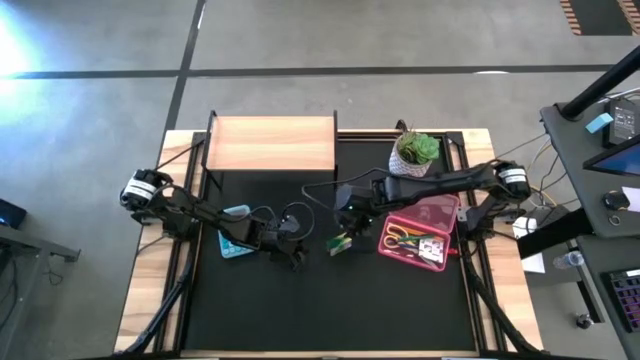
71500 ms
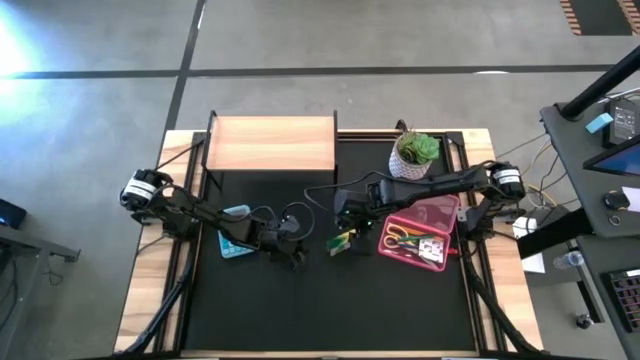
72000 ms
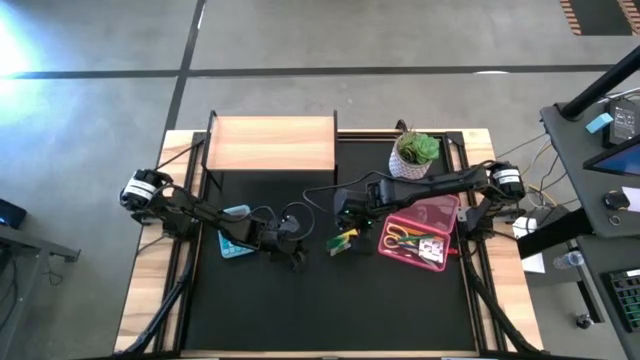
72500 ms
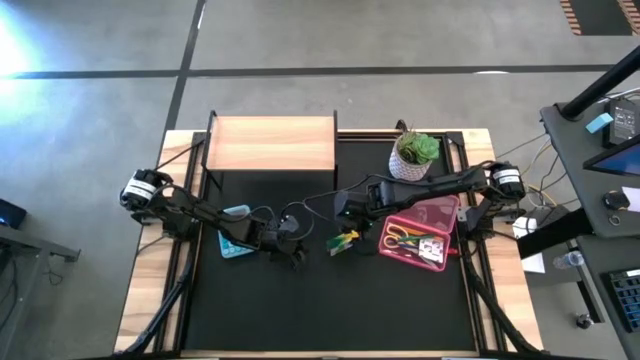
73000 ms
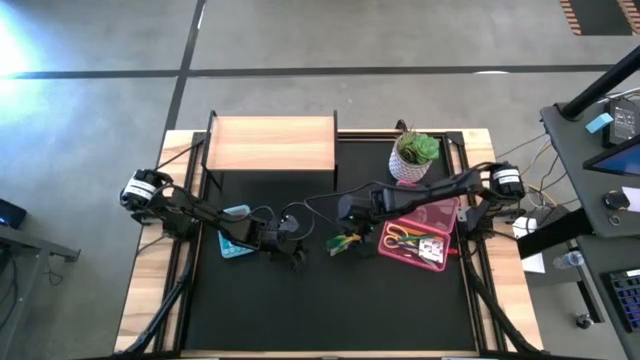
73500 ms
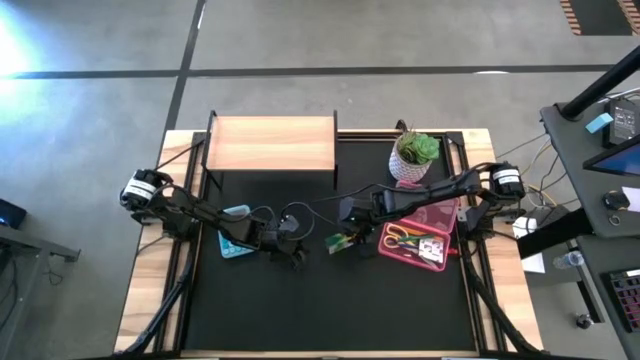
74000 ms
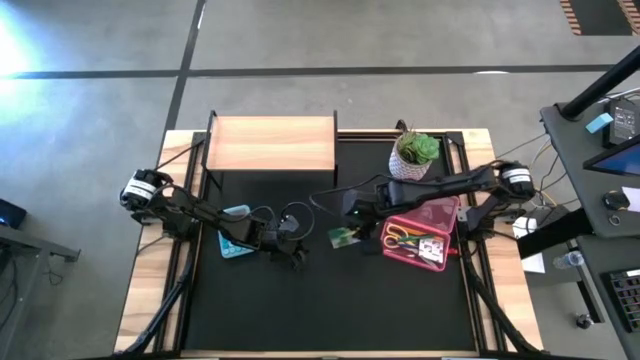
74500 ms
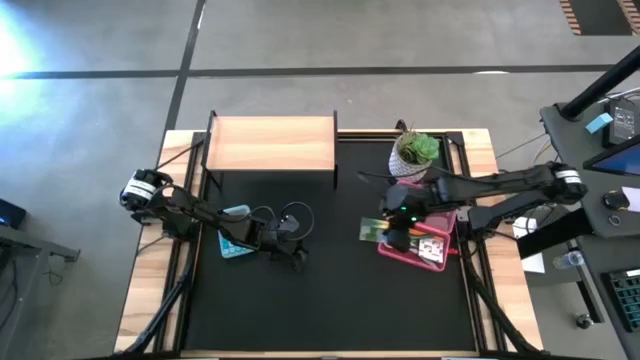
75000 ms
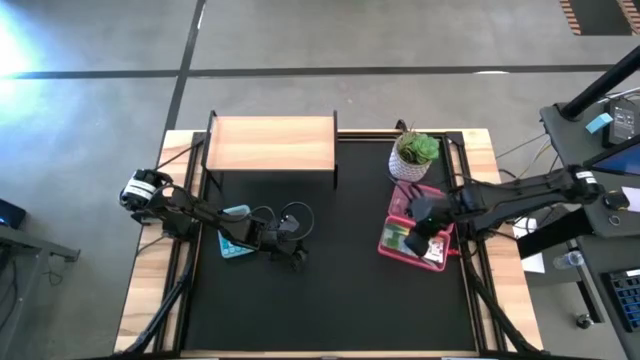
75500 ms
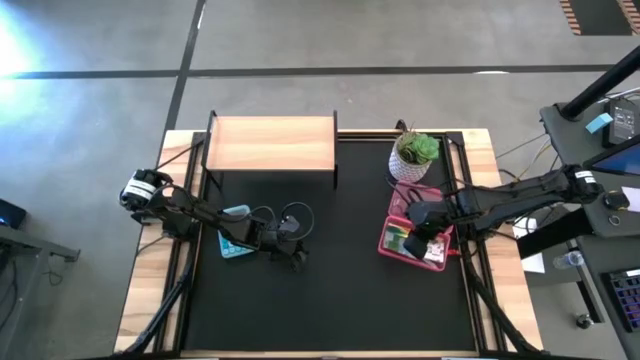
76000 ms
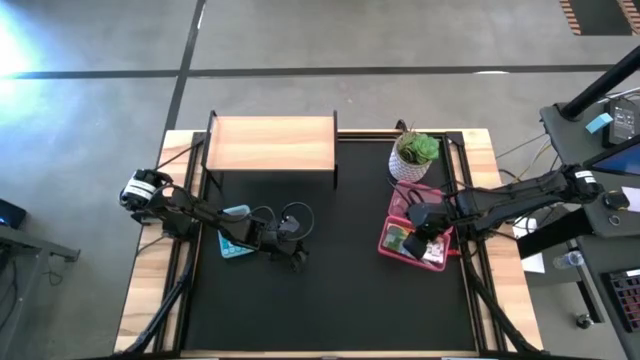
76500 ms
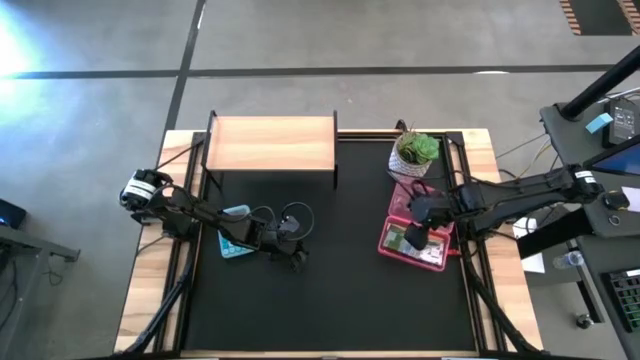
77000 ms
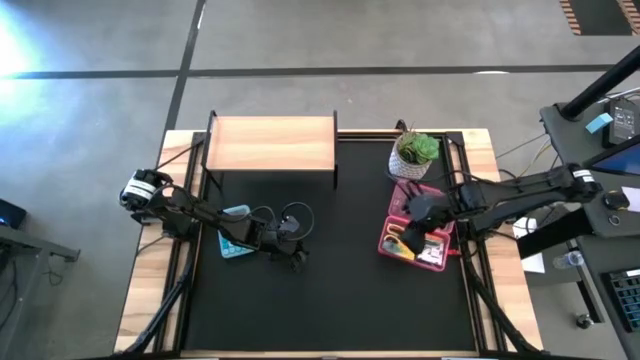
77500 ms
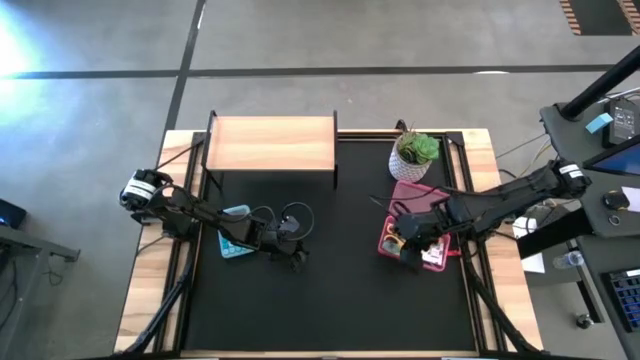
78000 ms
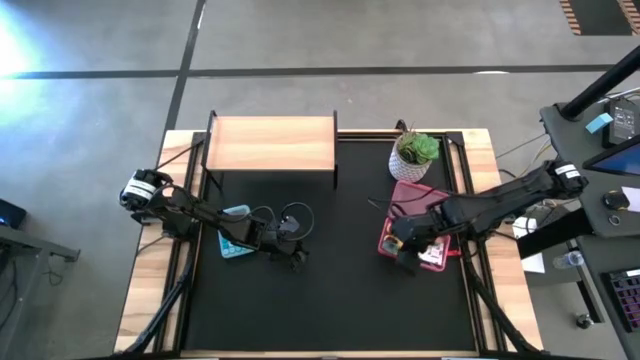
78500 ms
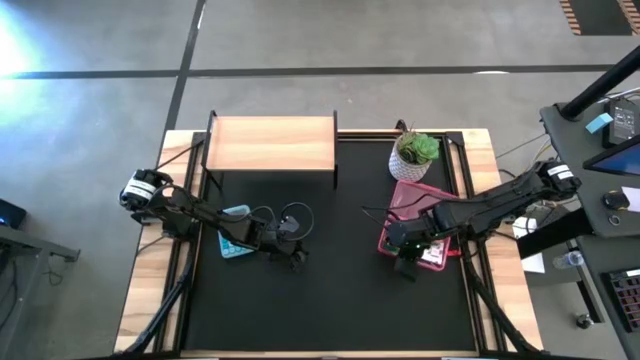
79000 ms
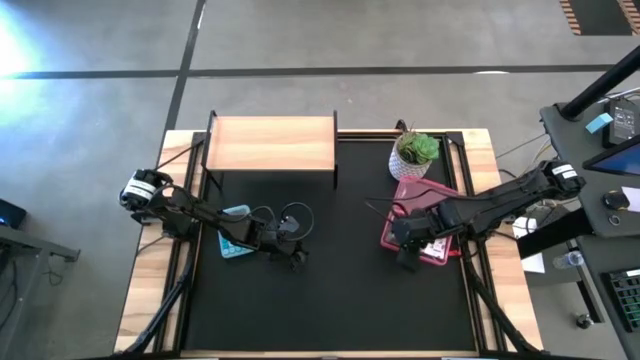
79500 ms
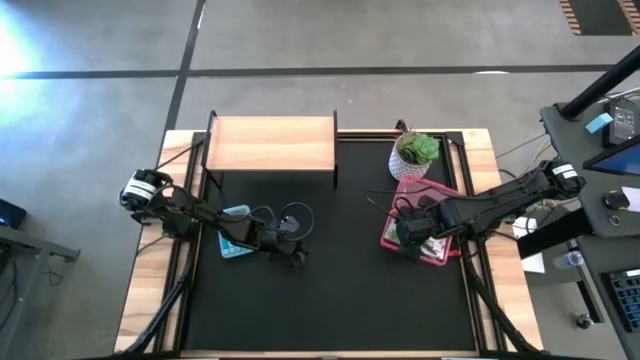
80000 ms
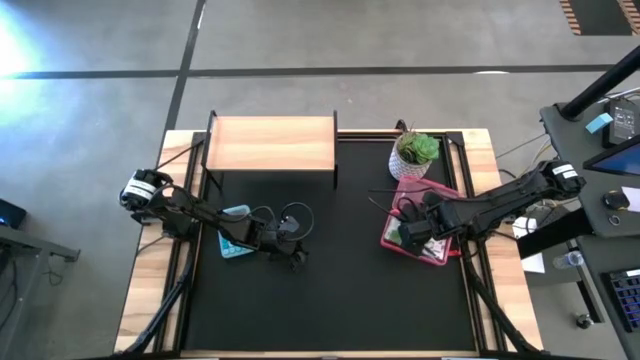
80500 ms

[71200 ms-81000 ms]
Task: Pack school essentials
Put the box of crayons into the pink supply box

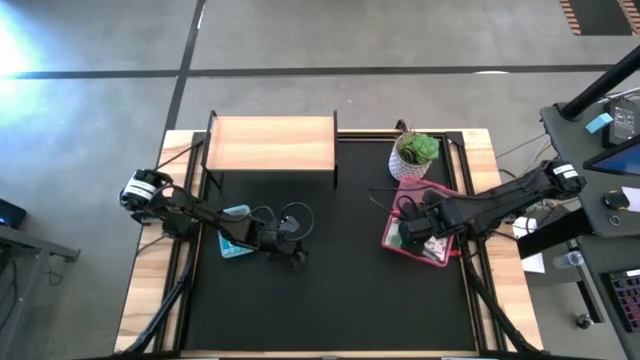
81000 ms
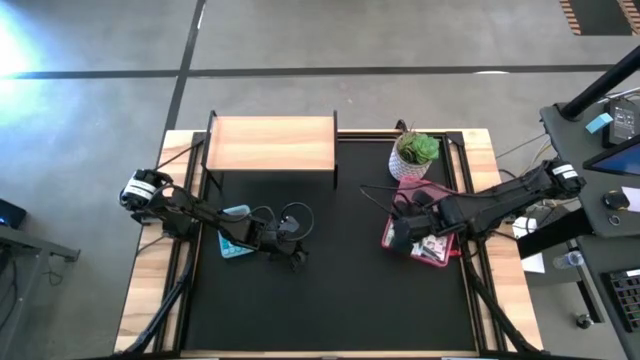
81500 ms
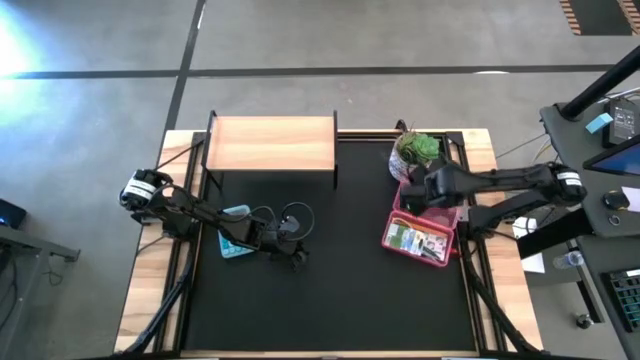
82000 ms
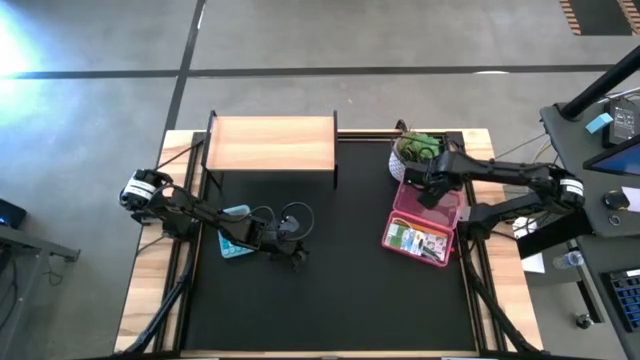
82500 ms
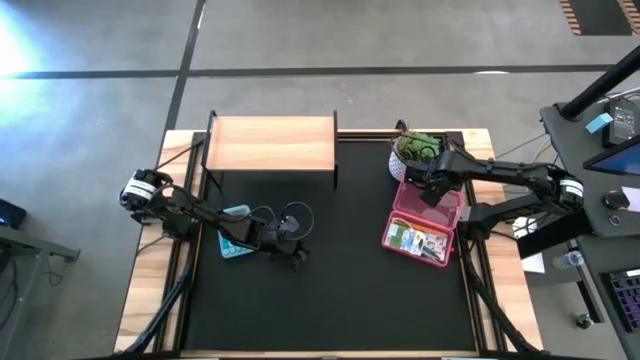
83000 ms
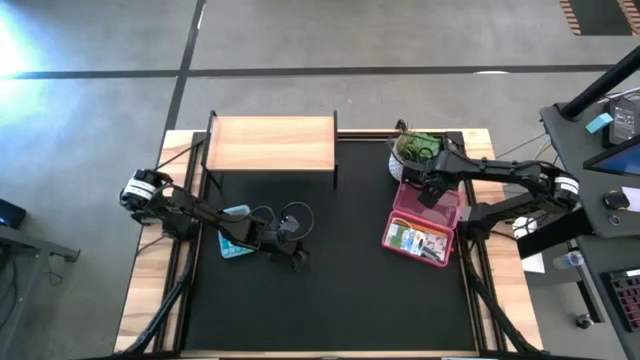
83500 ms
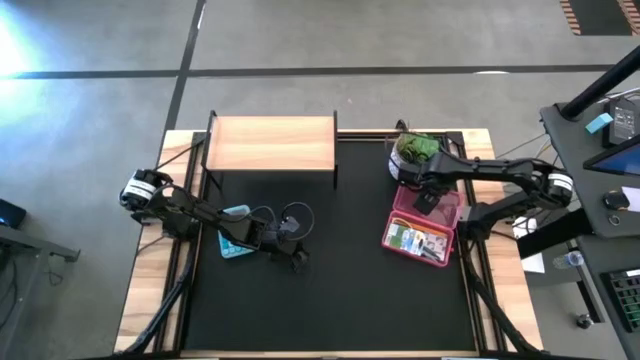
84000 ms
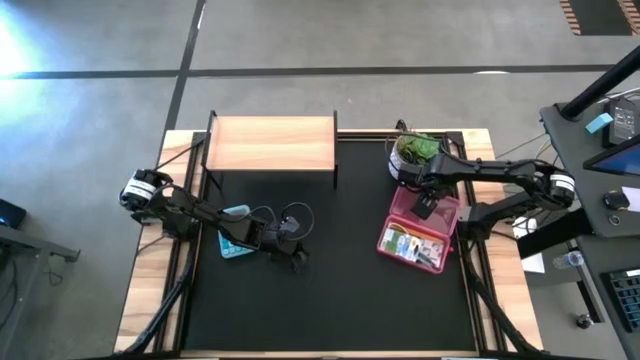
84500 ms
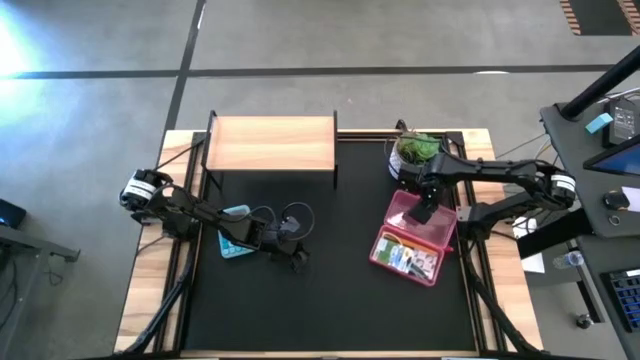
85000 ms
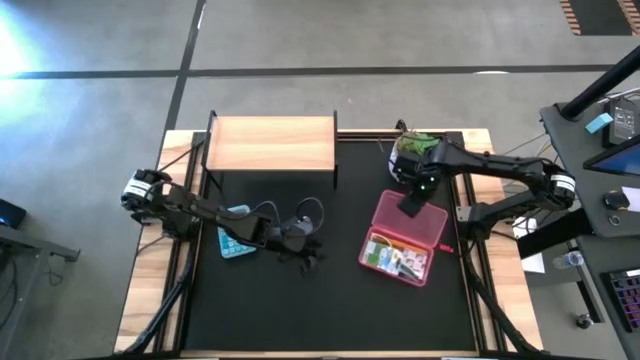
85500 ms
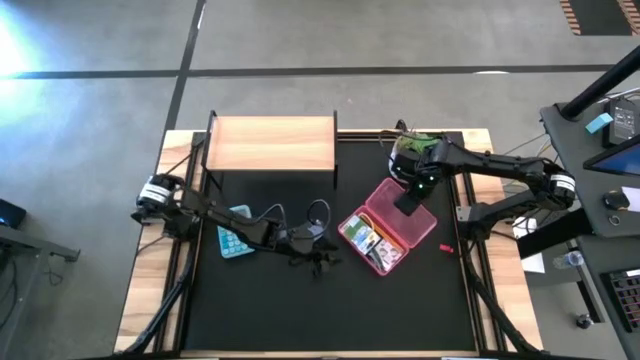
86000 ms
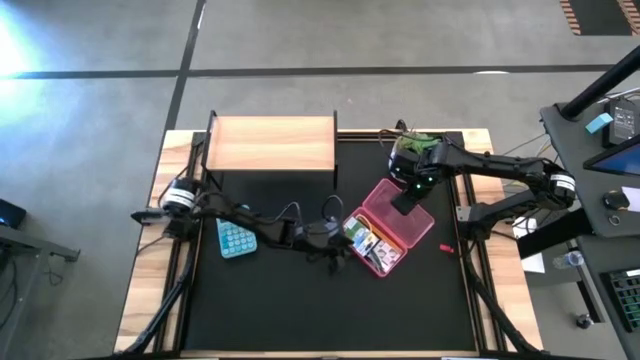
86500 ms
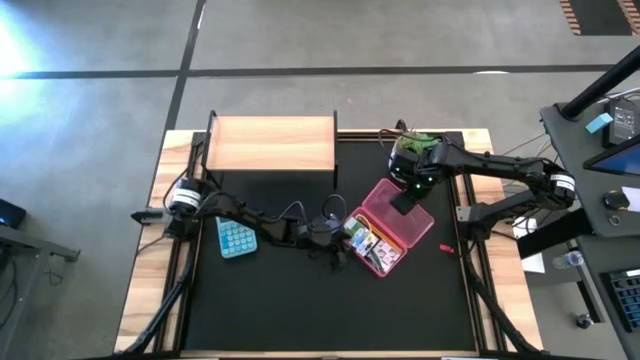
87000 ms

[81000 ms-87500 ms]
Close the pink supply box

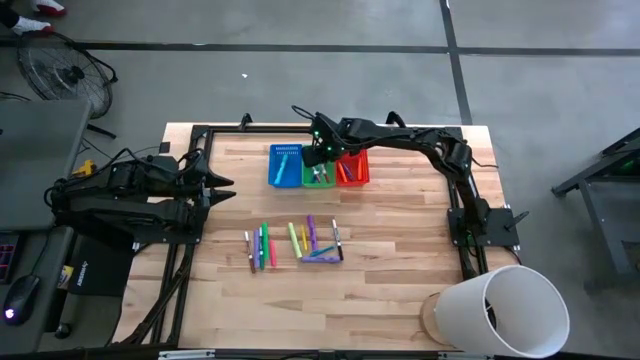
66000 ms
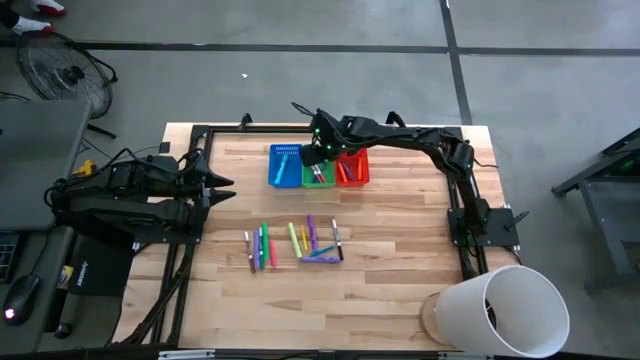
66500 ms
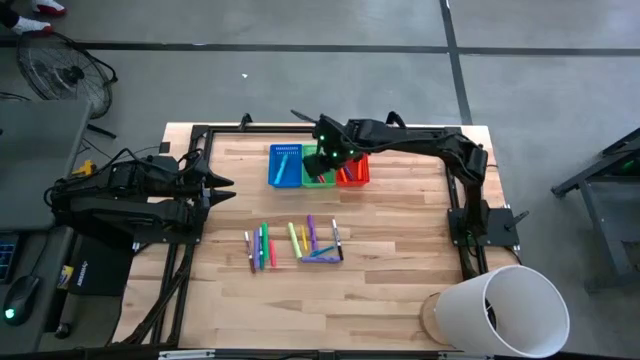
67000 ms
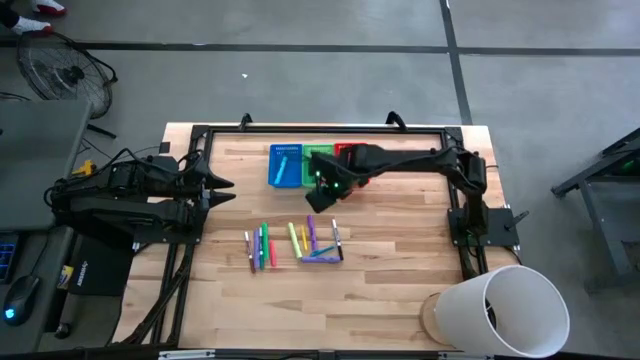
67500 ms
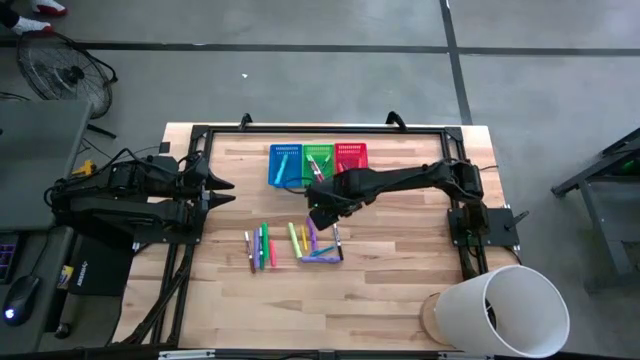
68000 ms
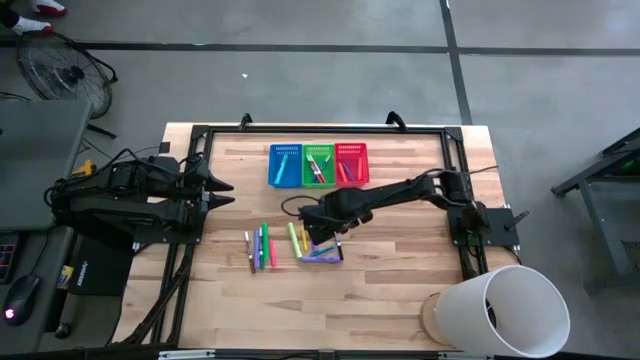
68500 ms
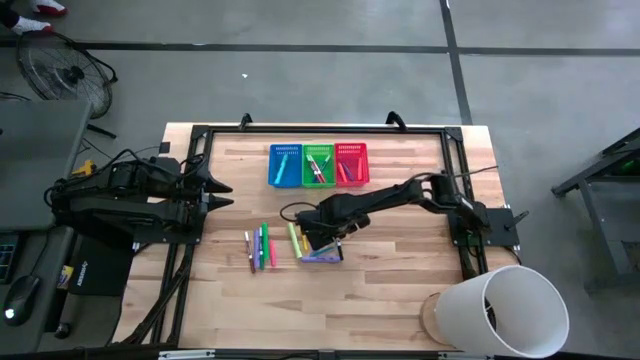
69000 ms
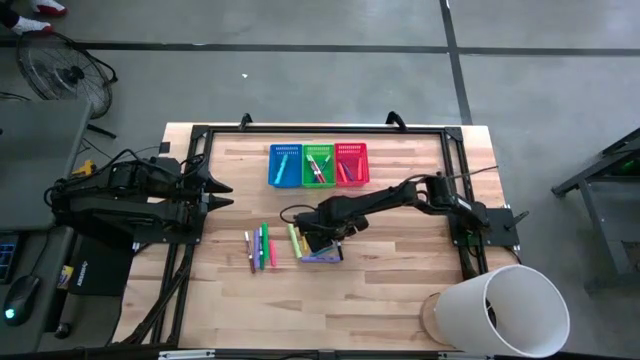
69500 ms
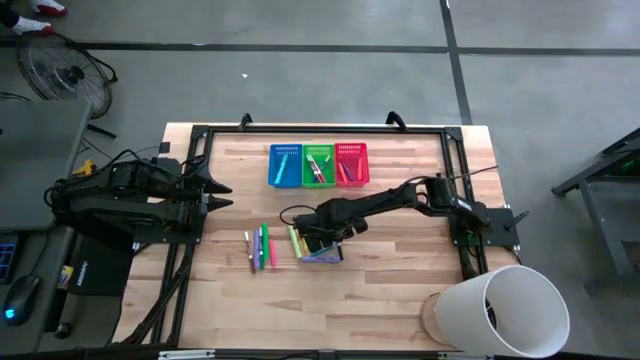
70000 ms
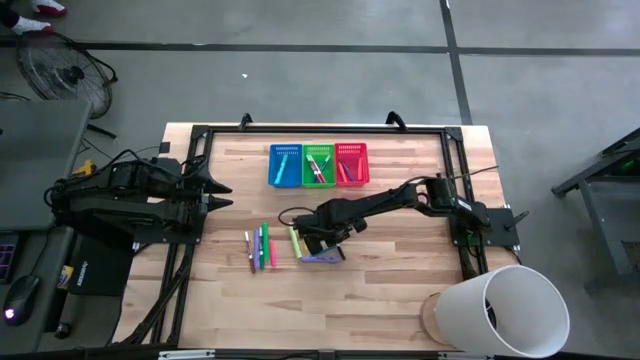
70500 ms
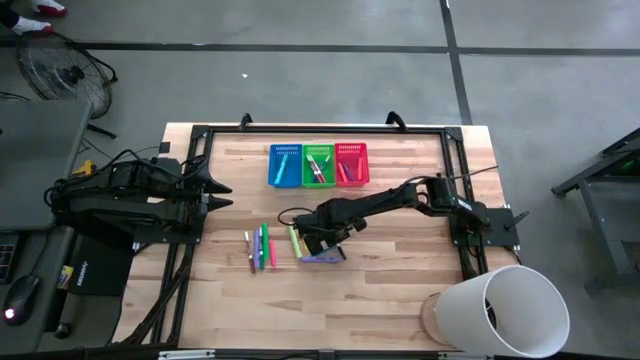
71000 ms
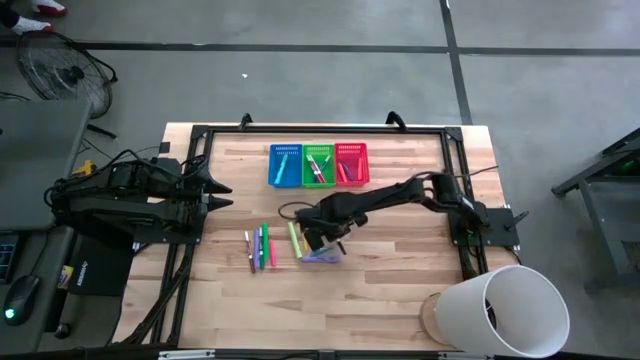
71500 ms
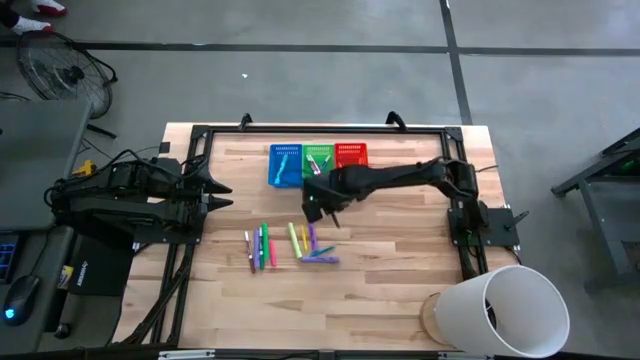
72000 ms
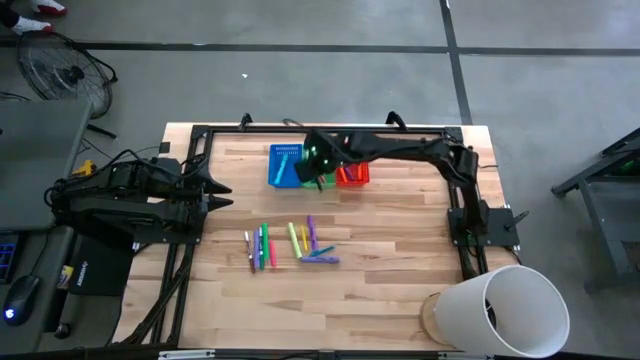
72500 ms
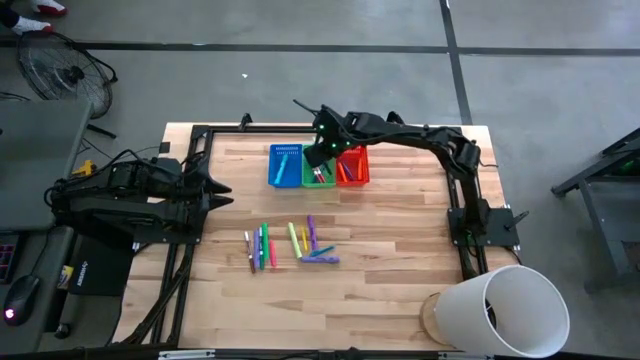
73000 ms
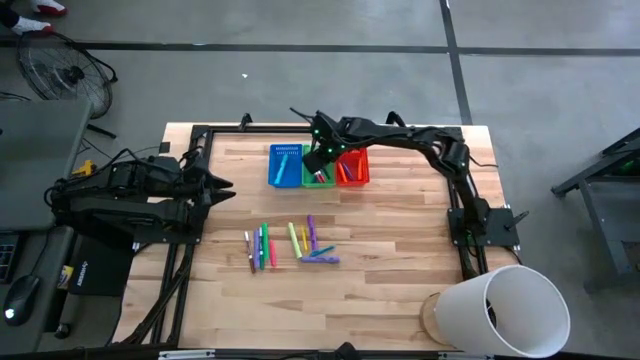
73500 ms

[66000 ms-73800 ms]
Task: Pick & Place Markers
Put the black marker pen into the green bin
